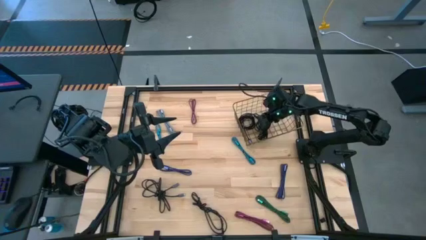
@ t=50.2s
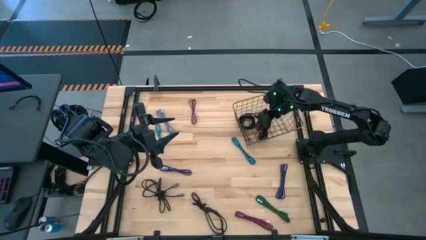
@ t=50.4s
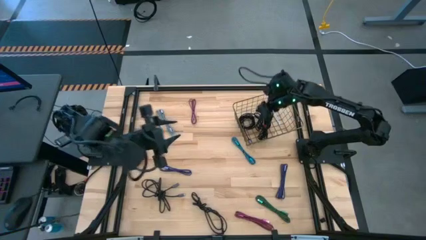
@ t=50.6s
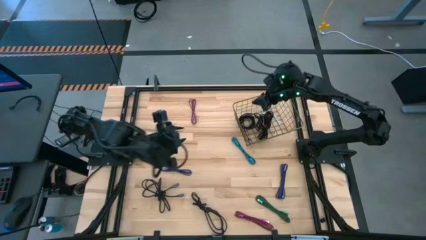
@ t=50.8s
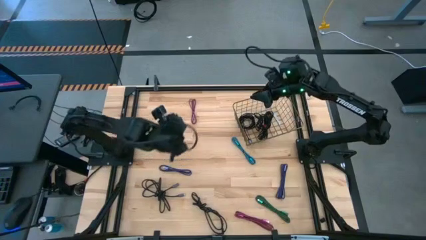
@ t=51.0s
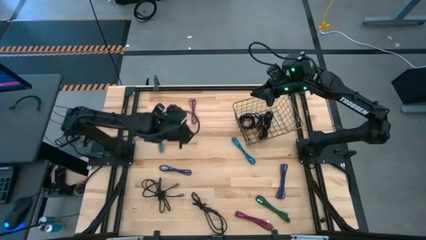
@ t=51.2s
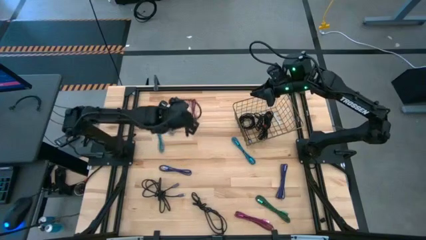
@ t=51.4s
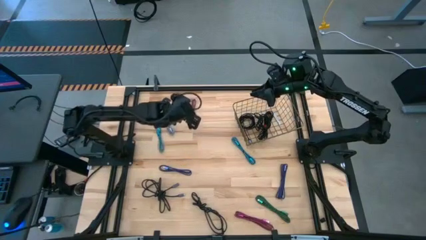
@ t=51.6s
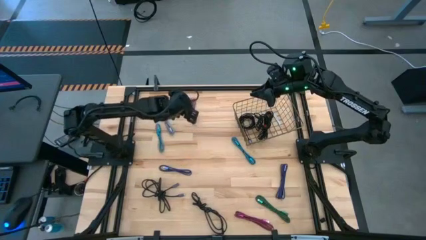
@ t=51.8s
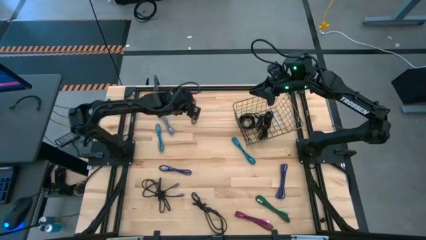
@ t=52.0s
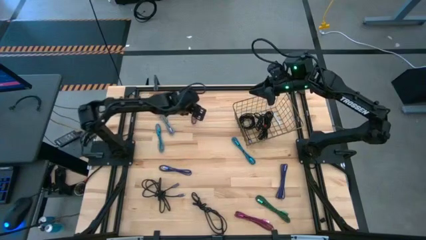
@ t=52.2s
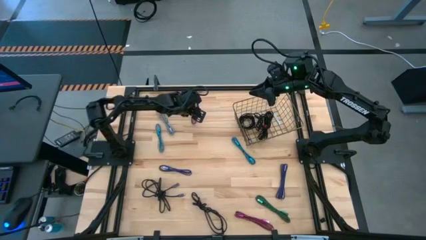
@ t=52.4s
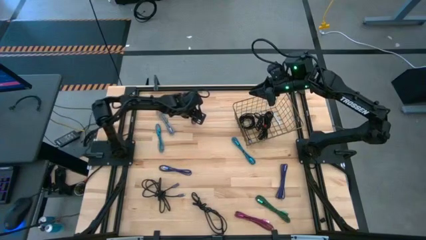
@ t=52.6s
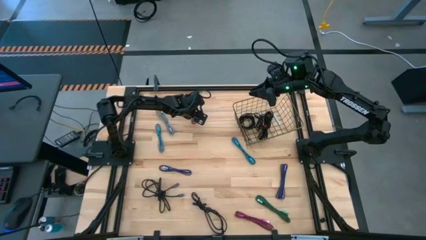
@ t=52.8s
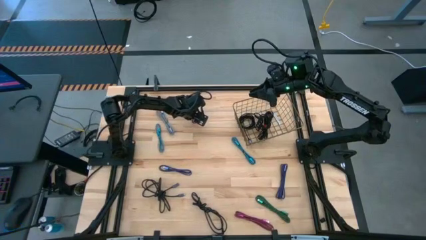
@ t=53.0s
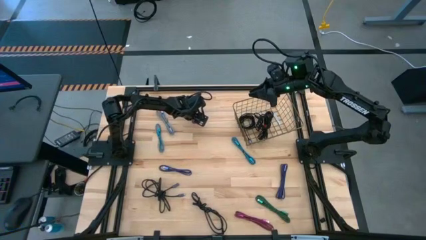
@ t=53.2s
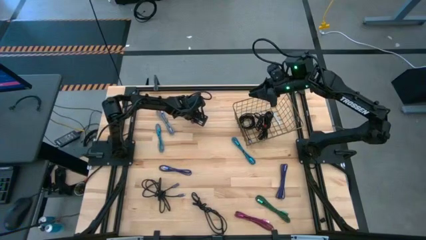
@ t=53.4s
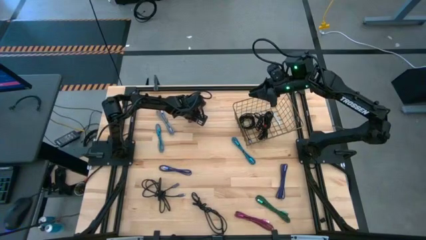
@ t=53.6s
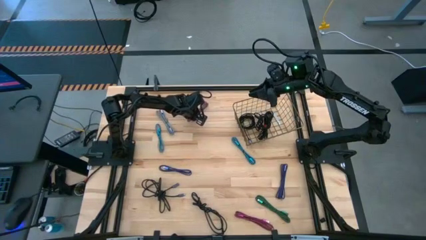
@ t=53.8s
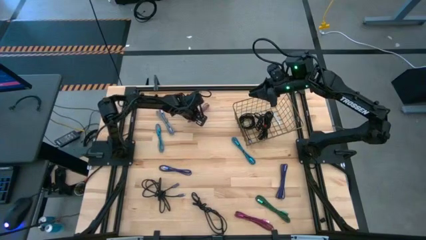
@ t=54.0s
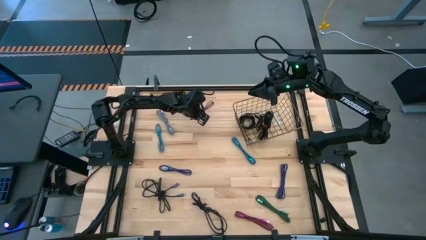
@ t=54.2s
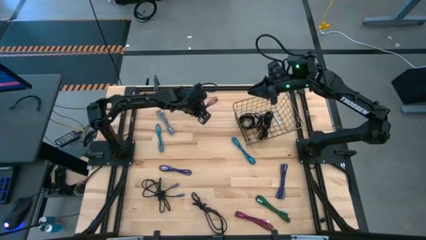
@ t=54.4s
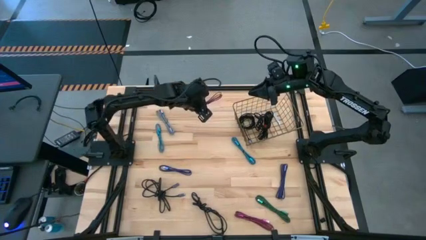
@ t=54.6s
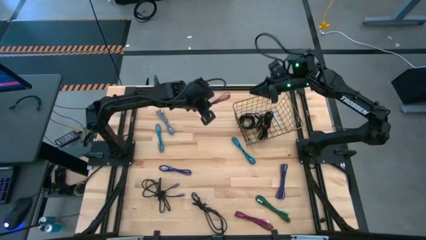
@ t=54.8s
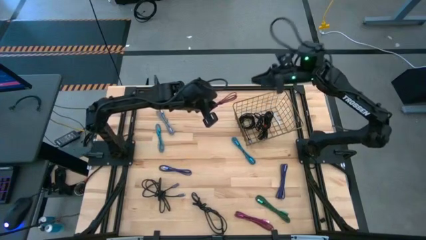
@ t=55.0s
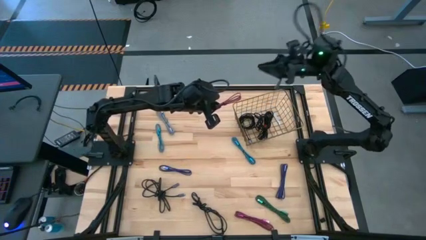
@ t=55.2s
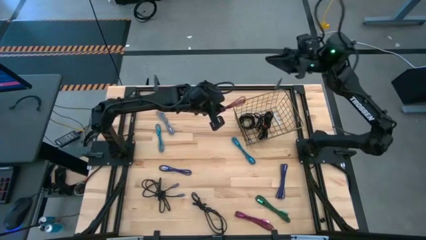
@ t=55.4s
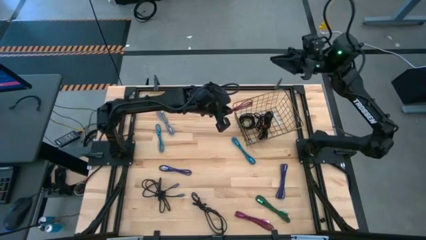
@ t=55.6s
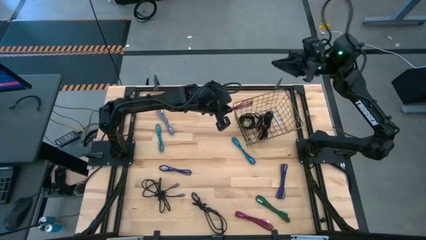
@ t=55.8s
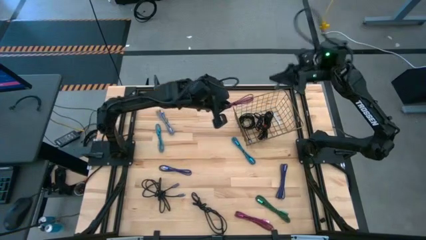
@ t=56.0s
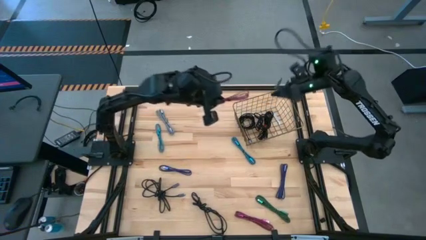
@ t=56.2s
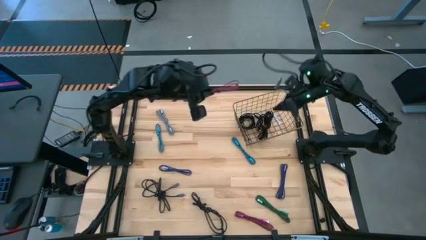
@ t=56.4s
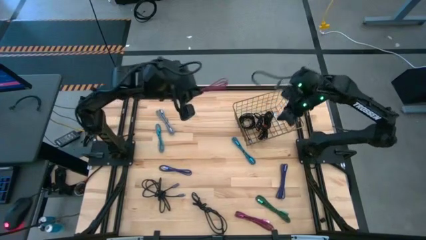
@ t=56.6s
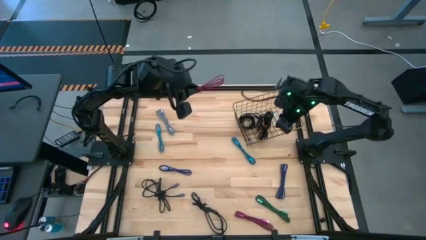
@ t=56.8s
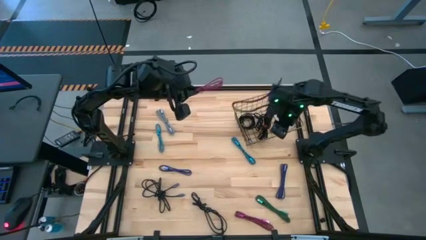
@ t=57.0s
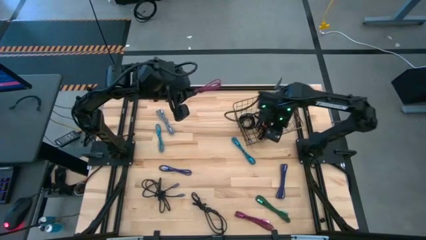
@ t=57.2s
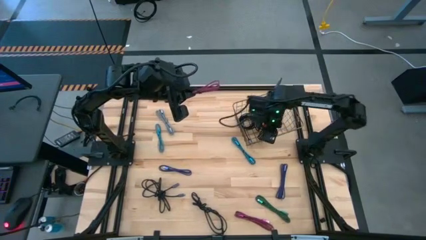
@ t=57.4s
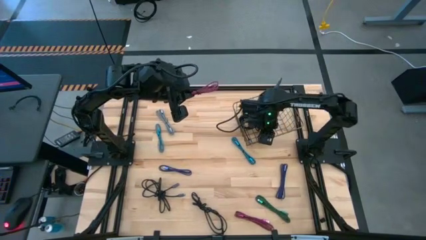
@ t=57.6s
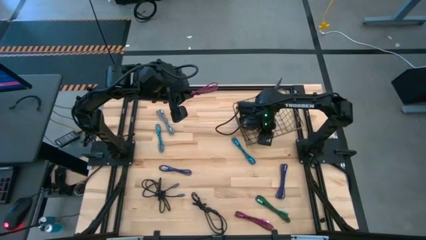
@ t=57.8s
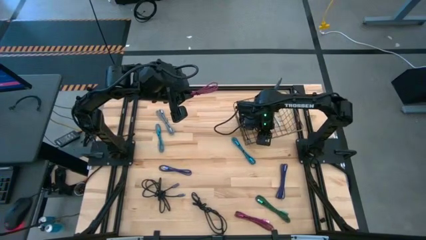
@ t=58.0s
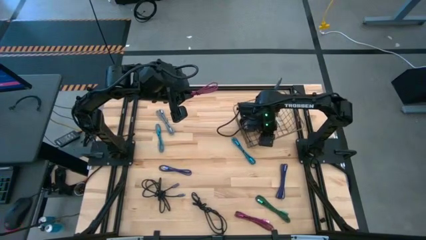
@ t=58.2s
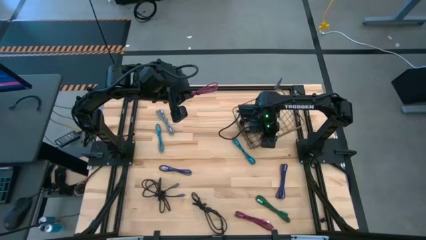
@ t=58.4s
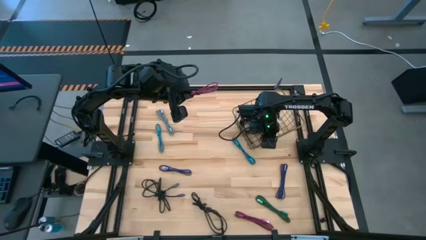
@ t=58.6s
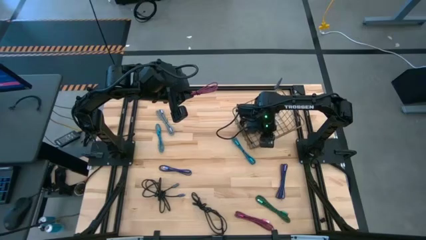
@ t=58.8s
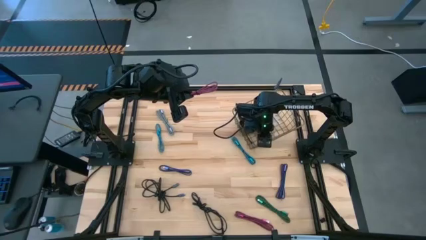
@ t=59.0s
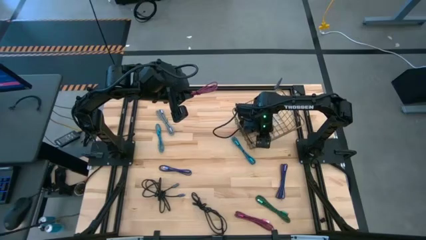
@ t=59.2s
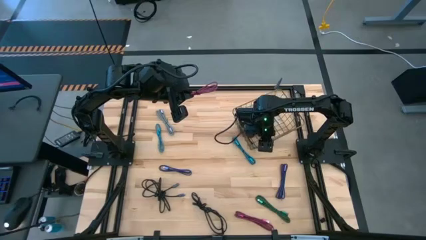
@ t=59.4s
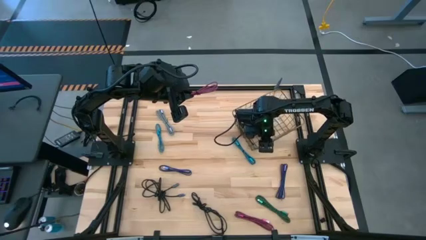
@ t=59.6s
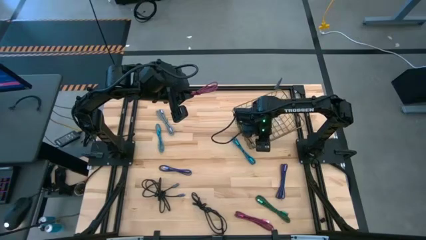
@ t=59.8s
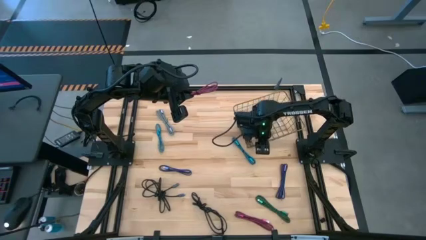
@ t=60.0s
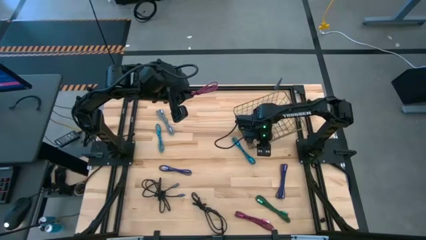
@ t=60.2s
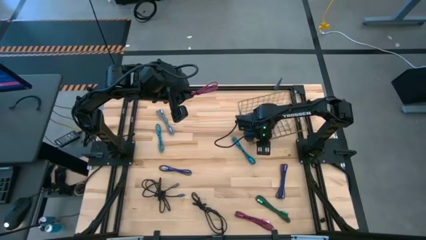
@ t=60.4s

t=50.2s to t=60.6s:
Task: Pick and place USB-C Cables
Put the pink charger cable into the wire basket
